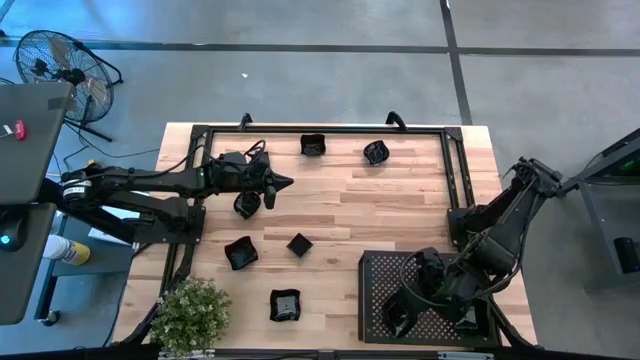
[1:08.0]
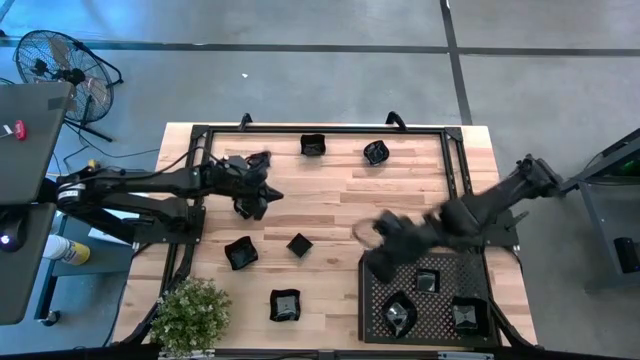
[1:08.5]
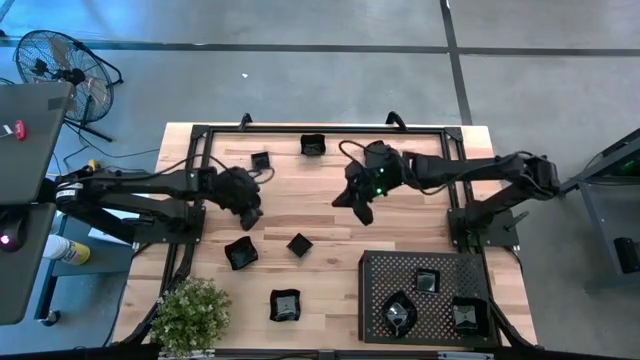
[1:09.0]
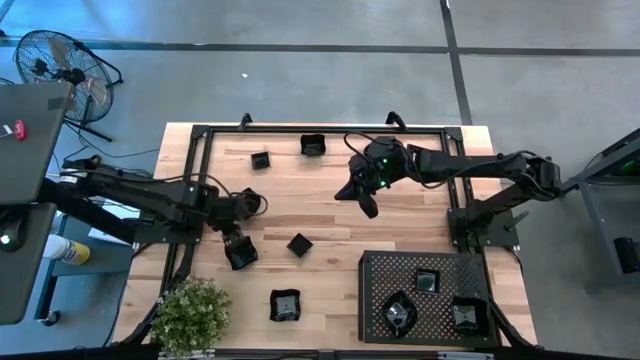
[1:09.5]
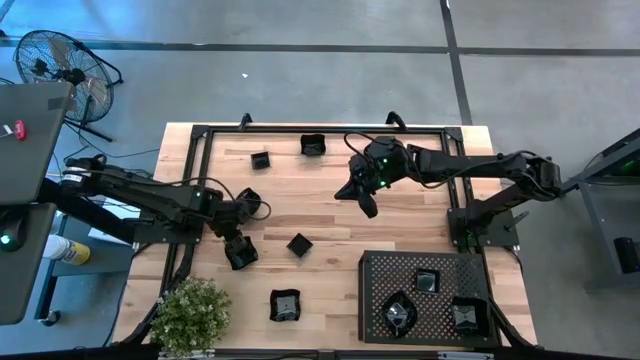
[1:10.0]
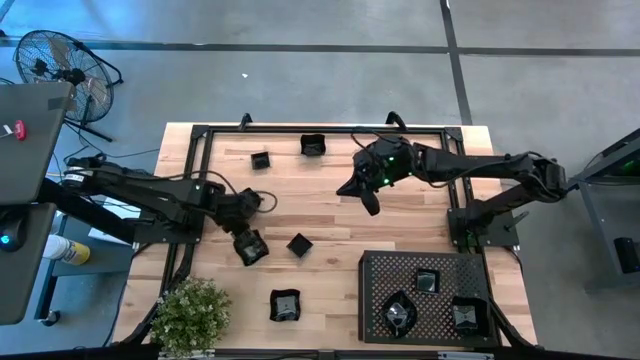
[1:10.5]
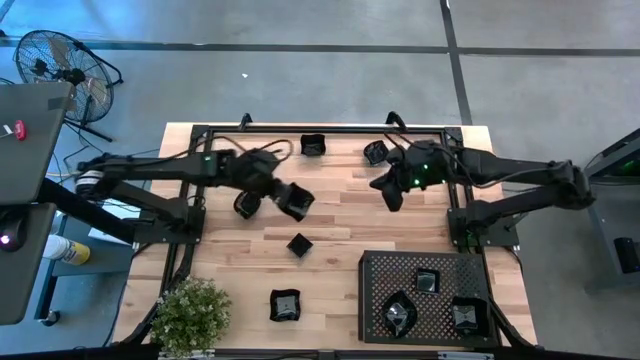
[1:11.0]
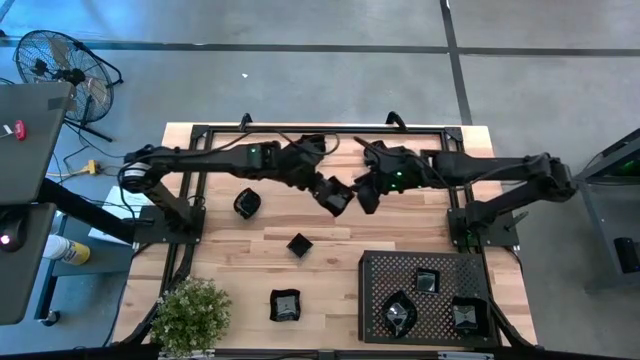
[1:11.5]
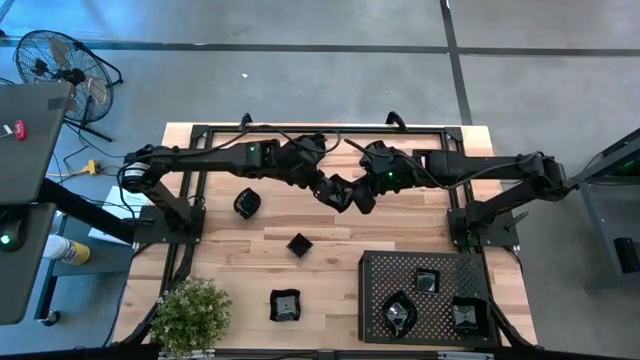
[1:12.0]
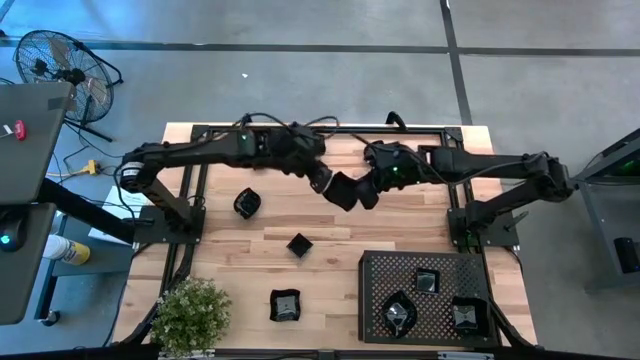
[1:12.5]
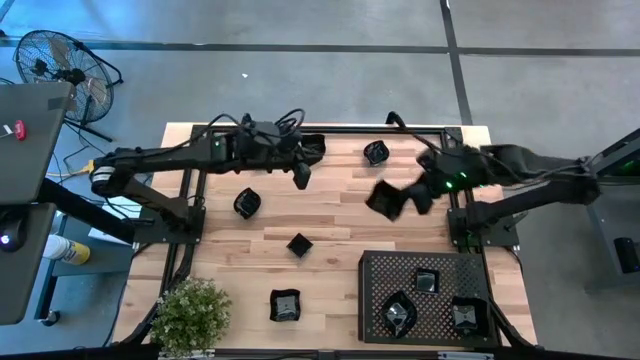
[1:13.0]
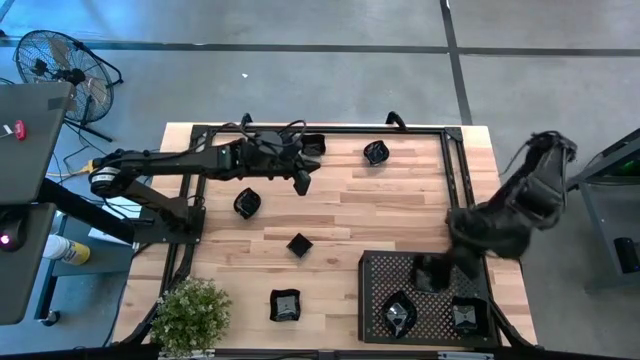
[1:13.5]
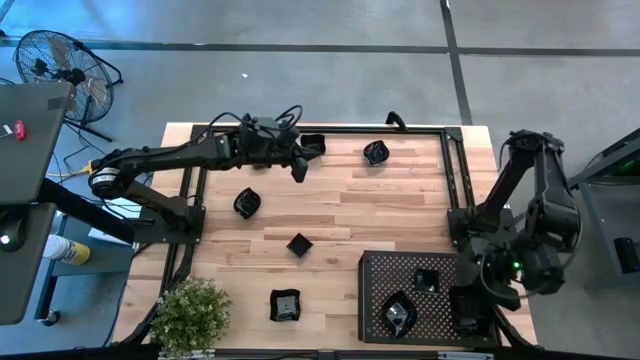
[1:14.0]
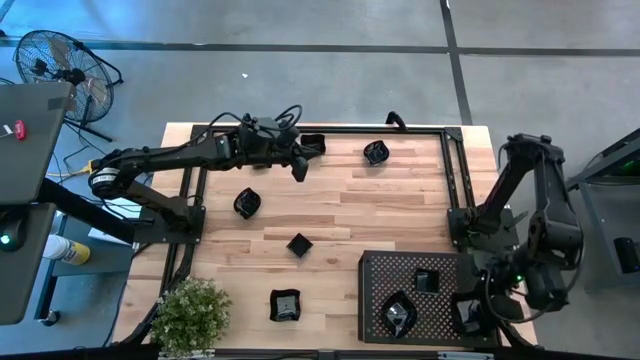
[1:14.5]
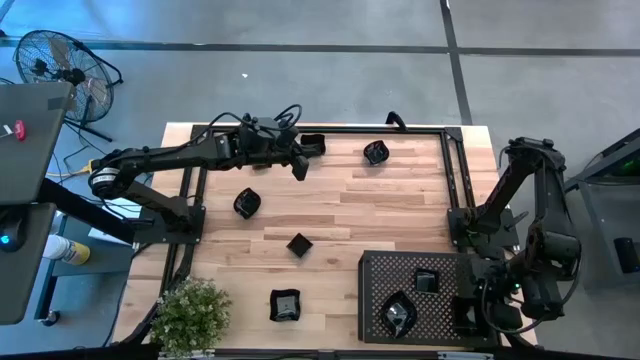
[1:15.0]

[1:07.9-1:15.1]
Task: Pick & Place Mini shaped plates
Stack the black distorted square plate on top of the black distorted square plate on the shelf

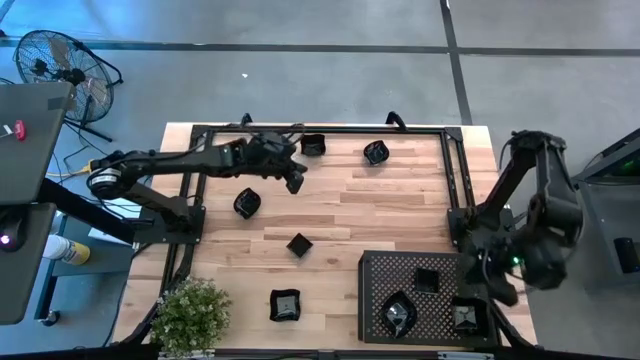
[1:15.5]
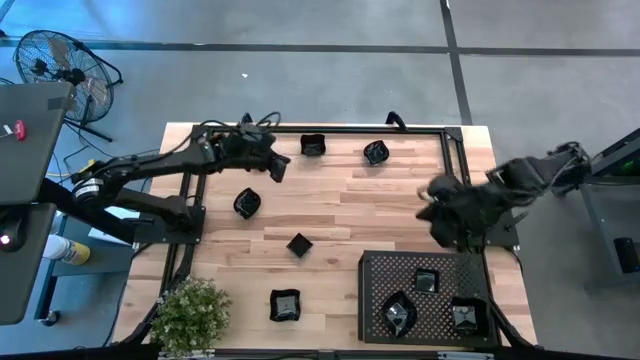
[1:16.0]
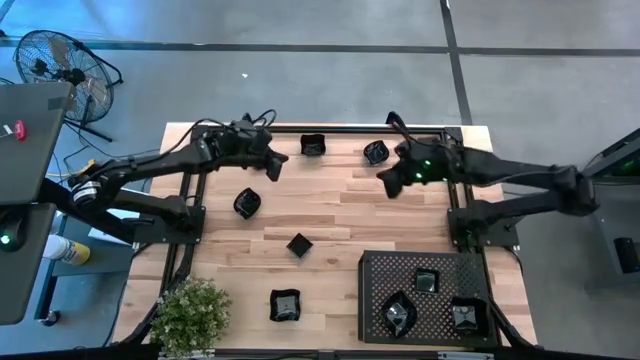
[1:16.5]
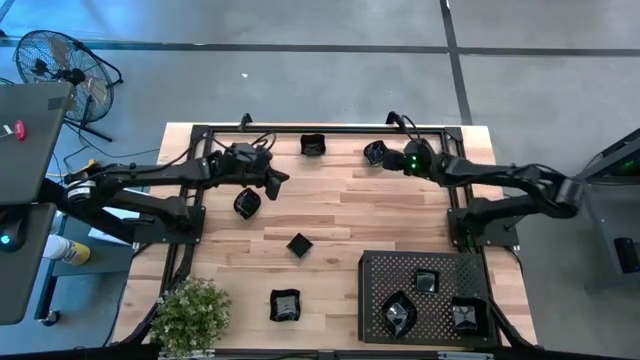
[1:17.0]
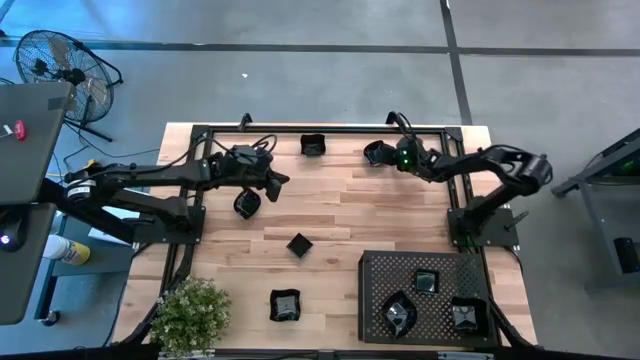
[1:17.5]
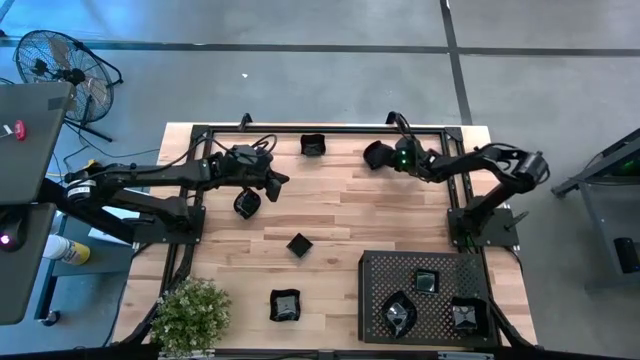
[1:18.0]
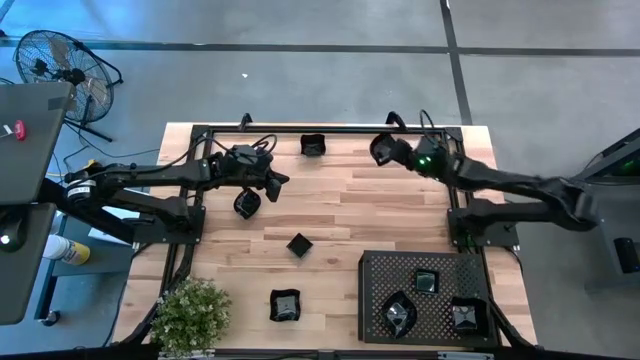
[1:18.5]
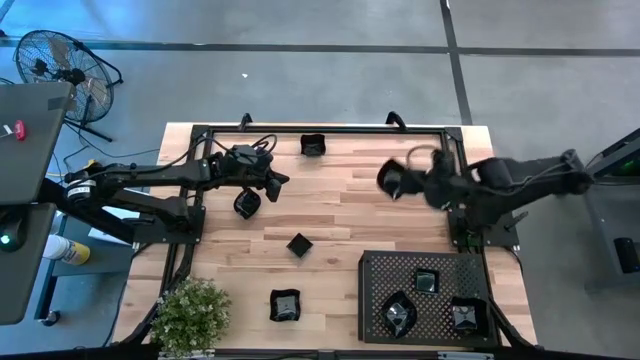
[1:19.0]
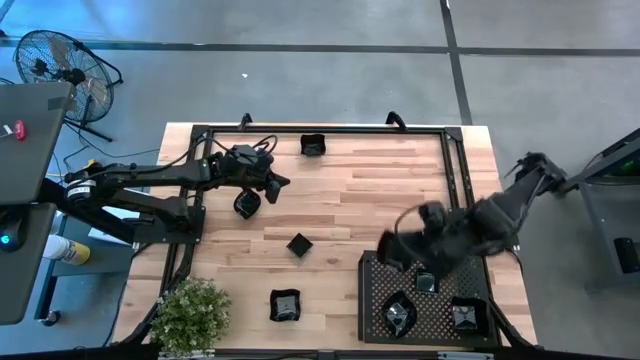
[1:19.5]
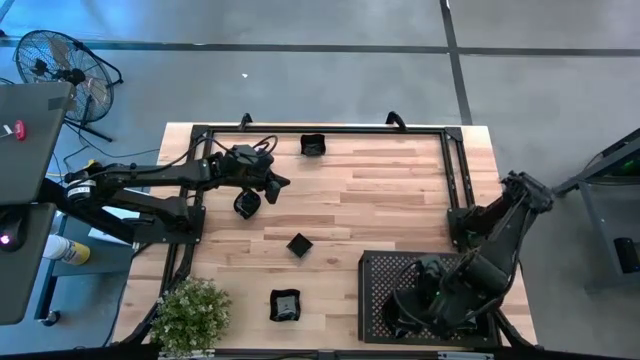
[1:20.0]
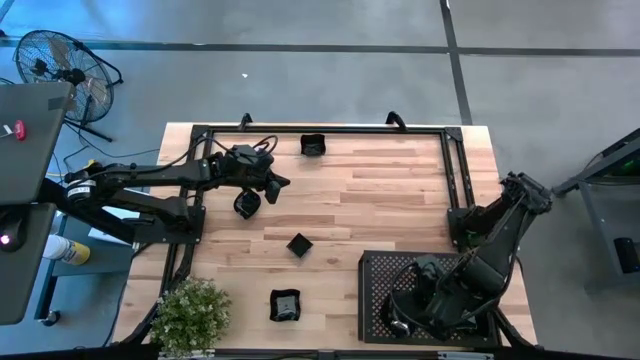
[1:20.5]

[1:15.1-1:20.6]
Stack the black leaf-shaped plate on top of the black leaf-shaped plate on the shelf

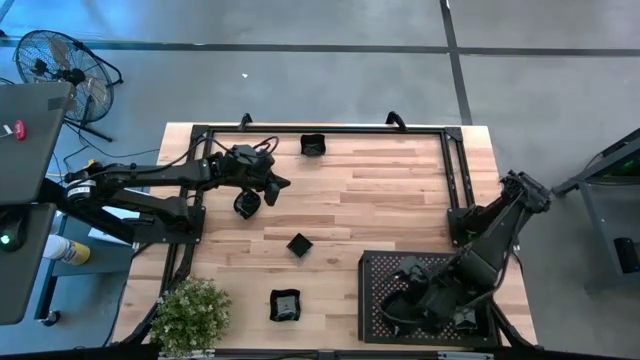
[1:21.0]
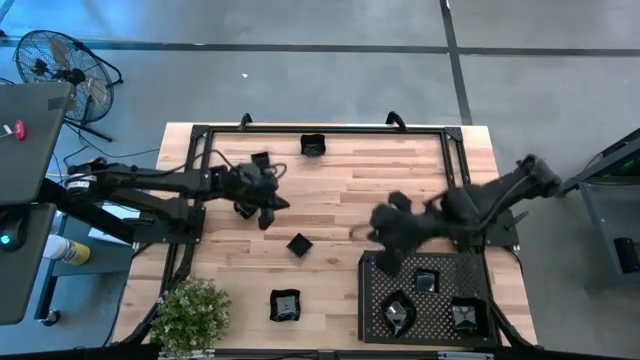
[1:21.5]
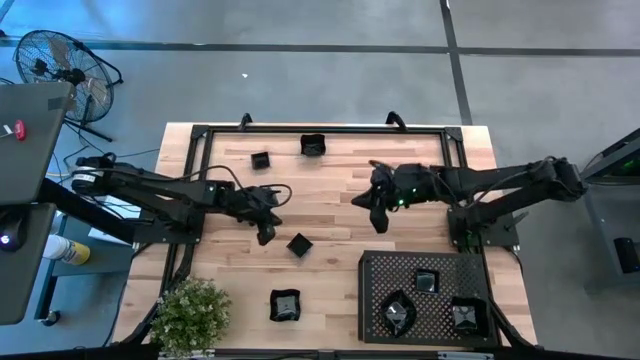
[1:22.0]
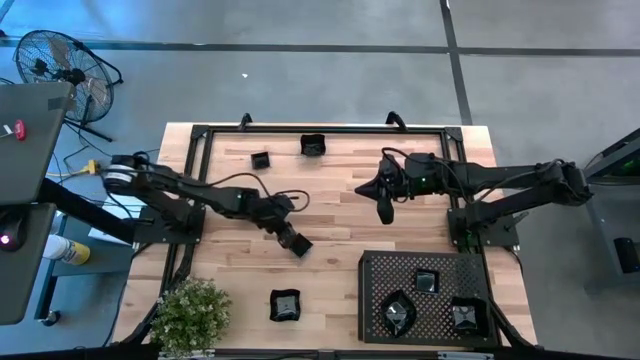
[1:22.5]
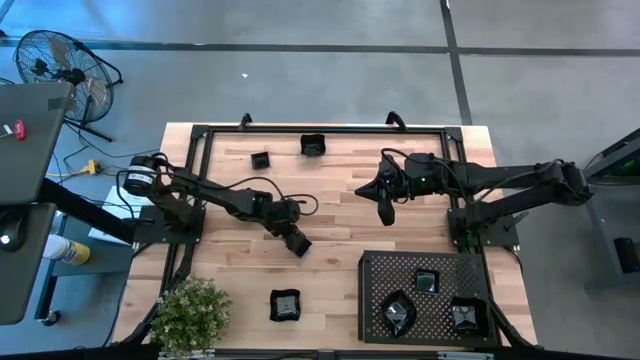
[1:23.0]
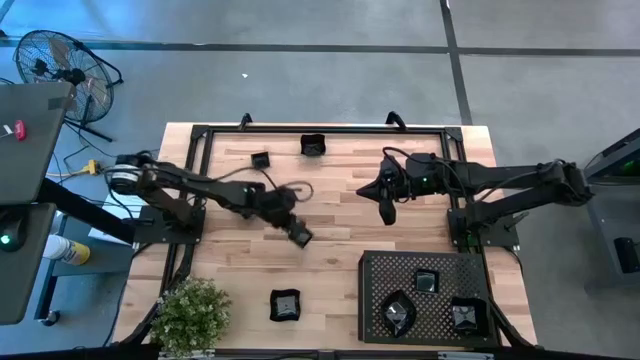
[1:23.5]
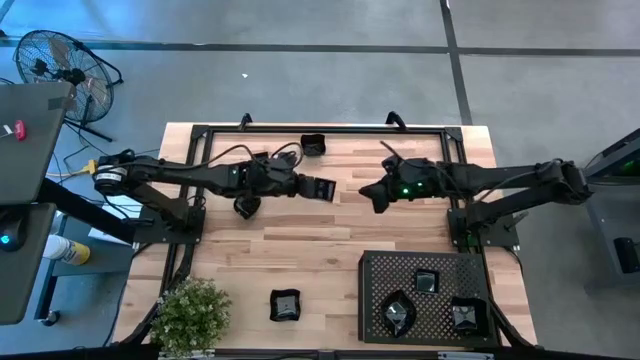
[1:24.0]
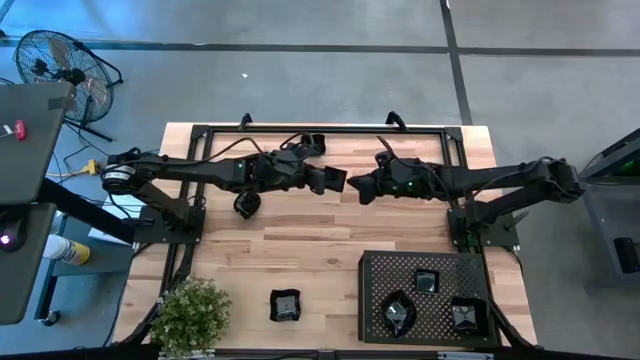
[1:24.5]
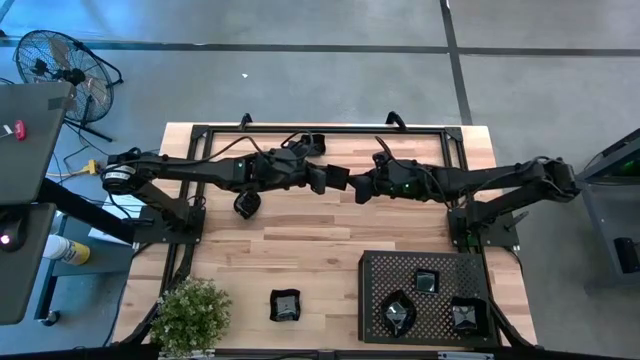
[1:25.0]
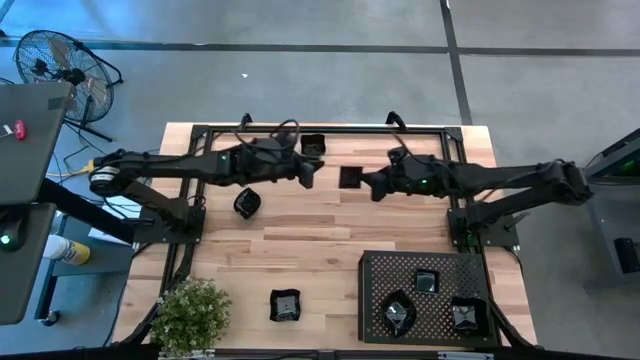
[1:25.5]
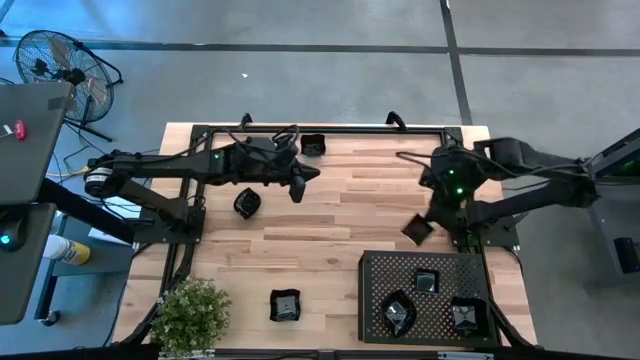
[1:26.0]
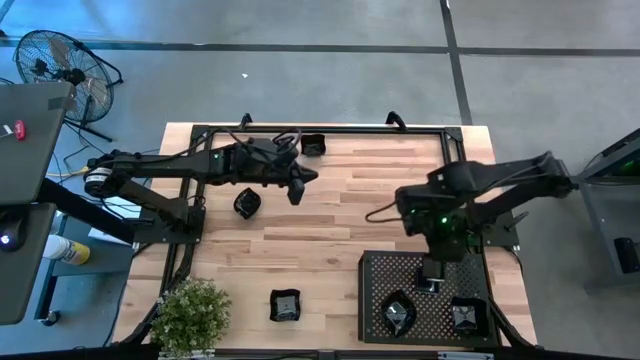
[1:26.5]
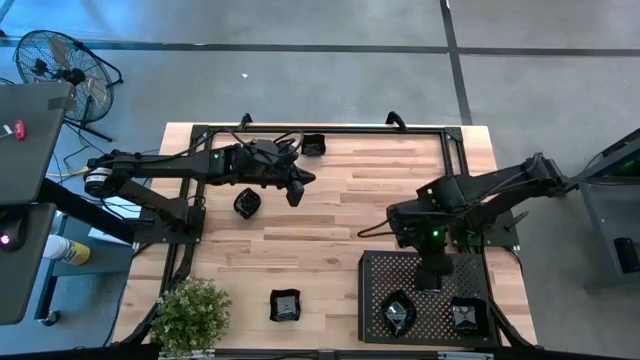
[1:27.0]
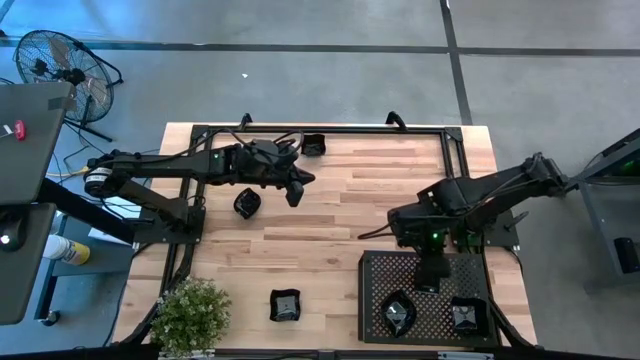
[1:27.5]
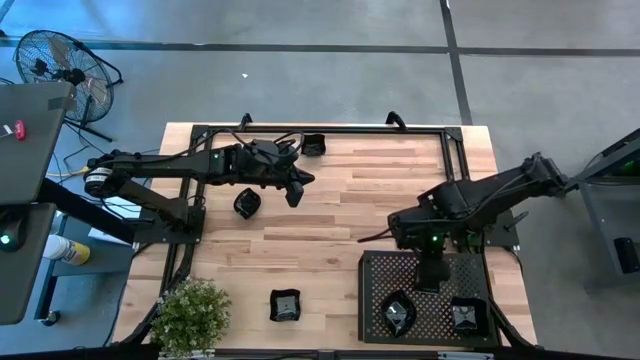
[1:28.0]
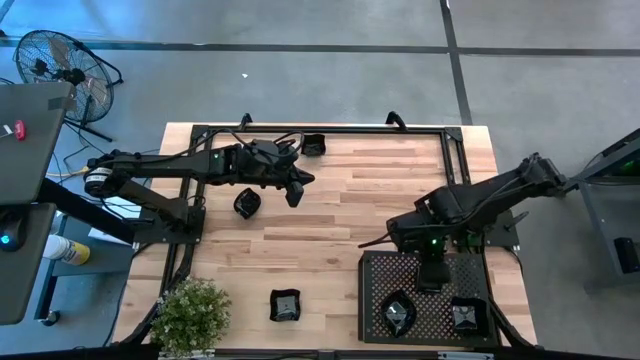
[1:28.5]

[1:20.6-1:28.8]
Stack the black square plate on top of the black square plate on the shelf
